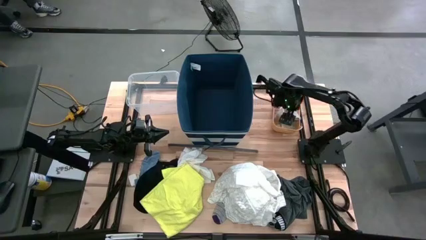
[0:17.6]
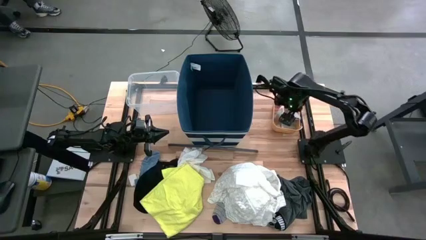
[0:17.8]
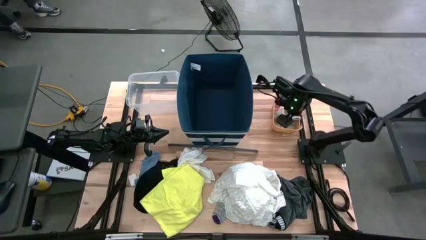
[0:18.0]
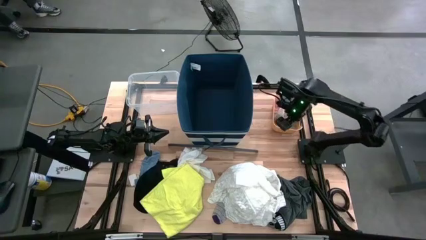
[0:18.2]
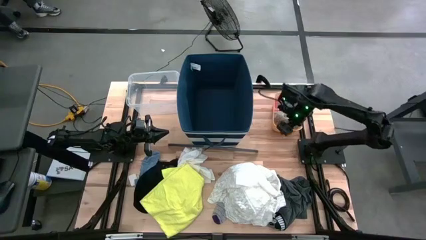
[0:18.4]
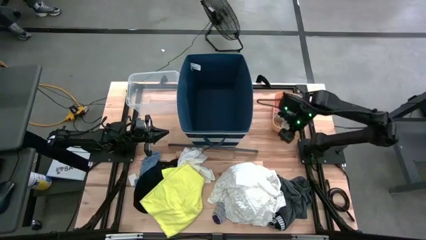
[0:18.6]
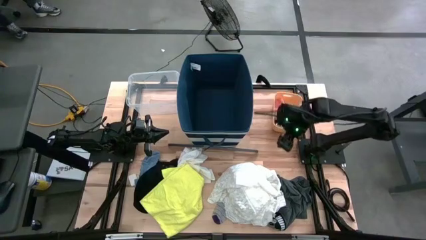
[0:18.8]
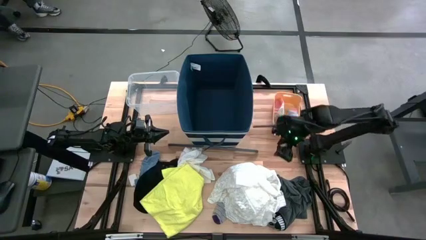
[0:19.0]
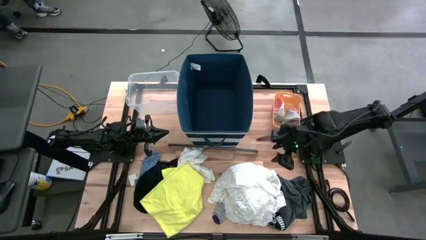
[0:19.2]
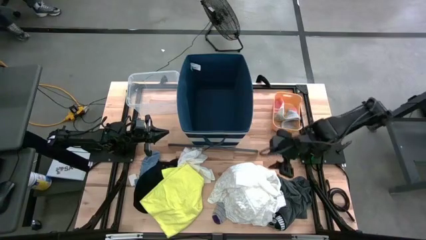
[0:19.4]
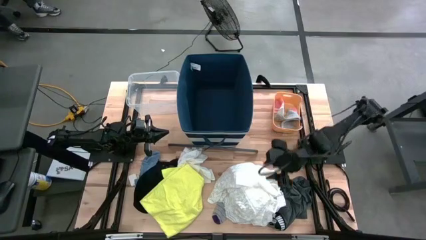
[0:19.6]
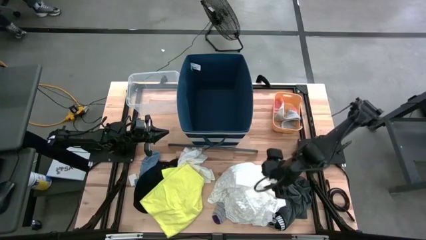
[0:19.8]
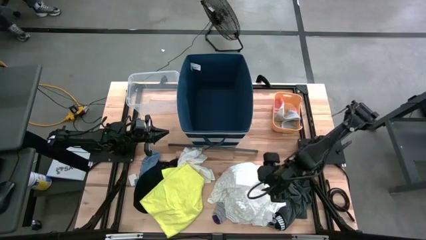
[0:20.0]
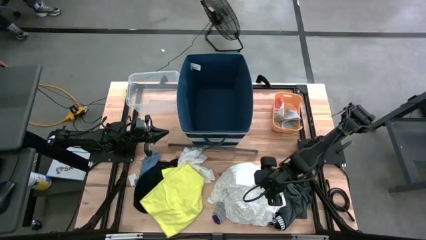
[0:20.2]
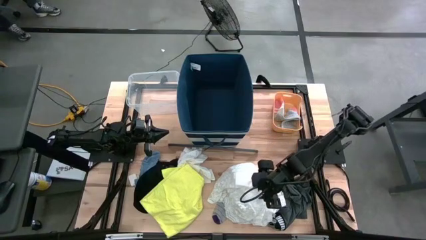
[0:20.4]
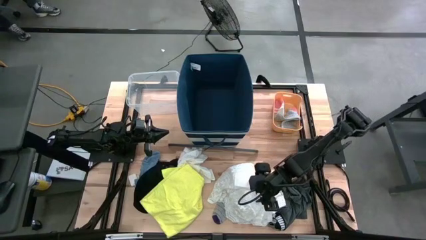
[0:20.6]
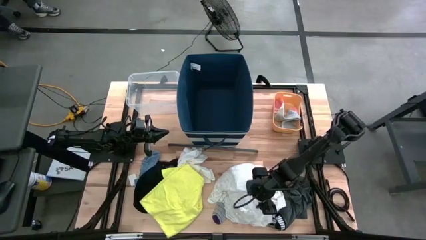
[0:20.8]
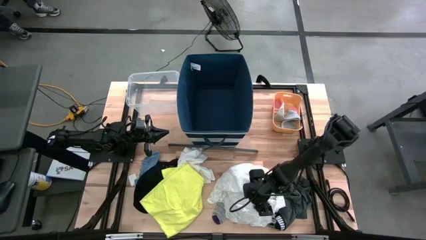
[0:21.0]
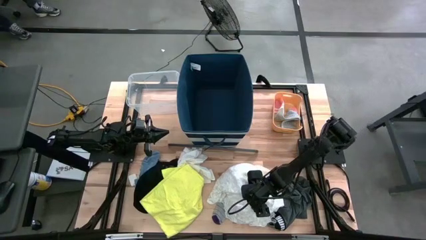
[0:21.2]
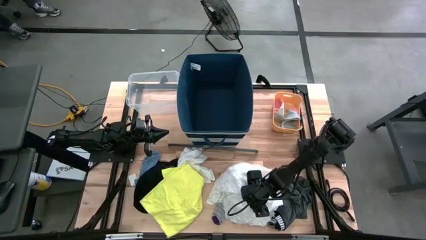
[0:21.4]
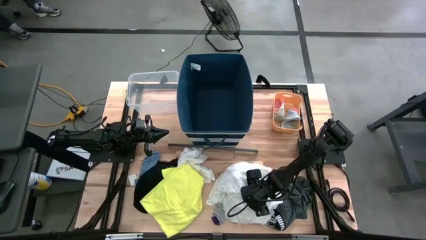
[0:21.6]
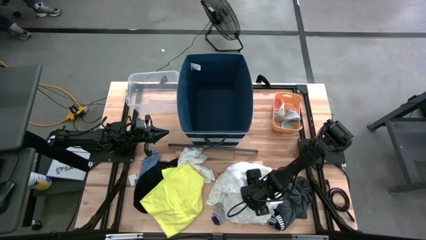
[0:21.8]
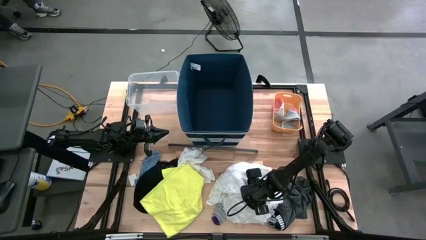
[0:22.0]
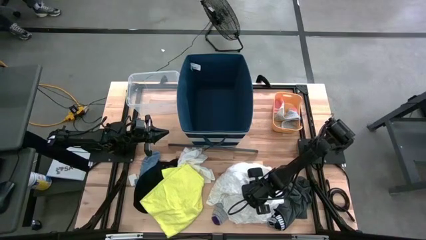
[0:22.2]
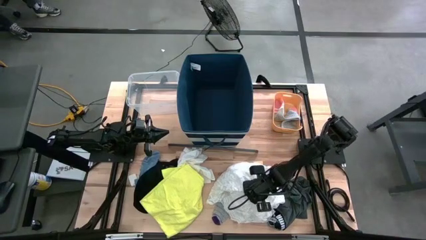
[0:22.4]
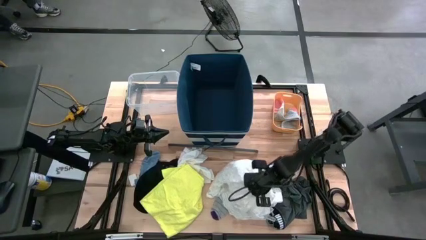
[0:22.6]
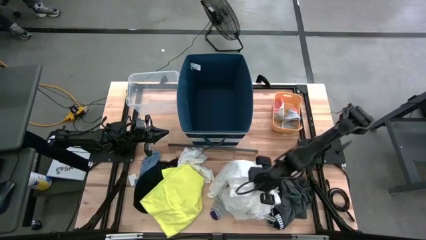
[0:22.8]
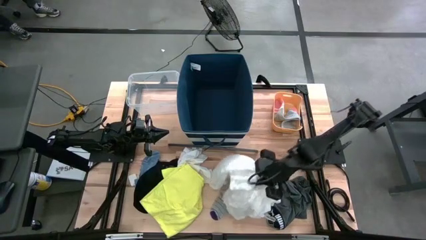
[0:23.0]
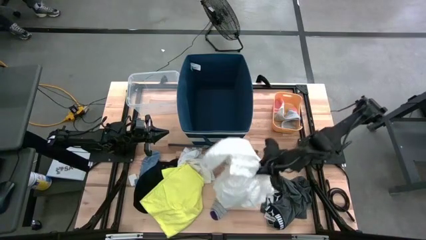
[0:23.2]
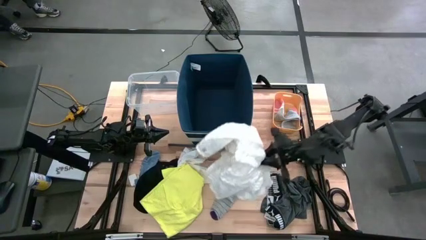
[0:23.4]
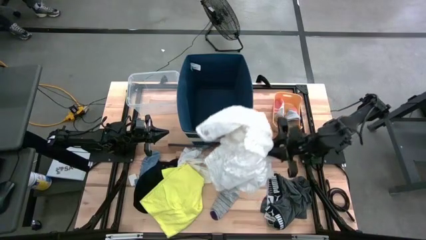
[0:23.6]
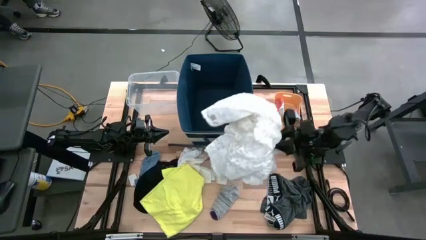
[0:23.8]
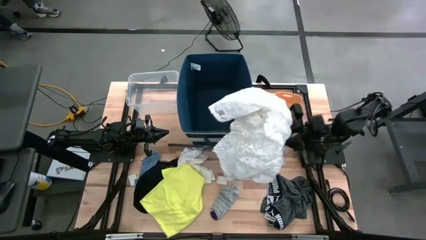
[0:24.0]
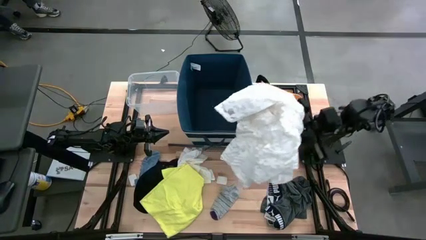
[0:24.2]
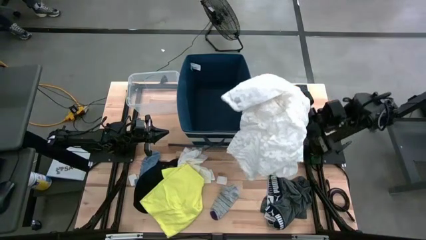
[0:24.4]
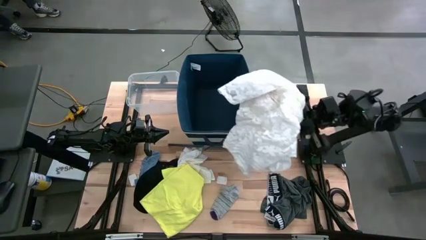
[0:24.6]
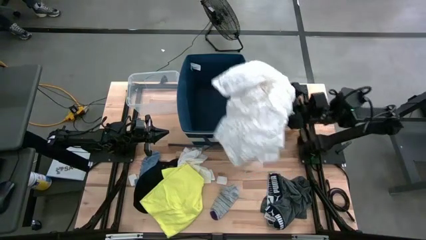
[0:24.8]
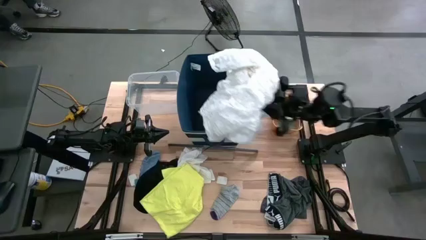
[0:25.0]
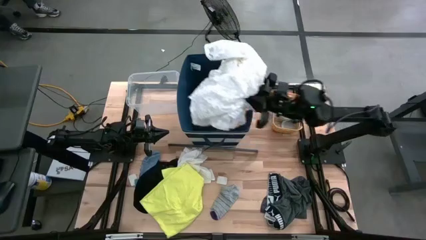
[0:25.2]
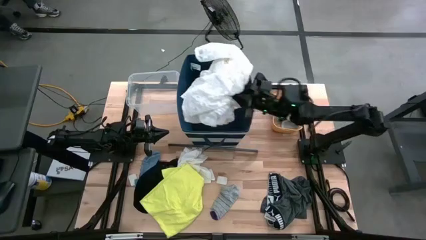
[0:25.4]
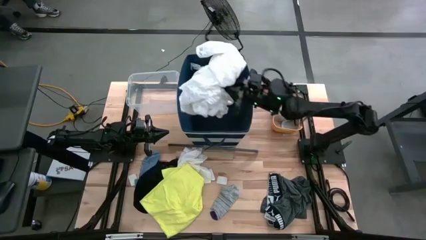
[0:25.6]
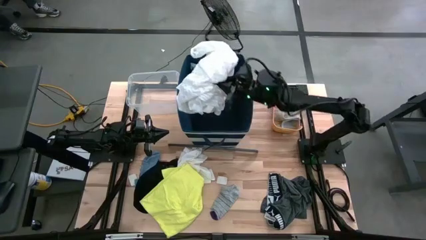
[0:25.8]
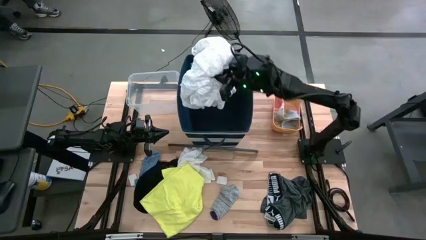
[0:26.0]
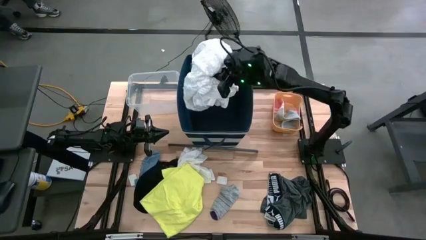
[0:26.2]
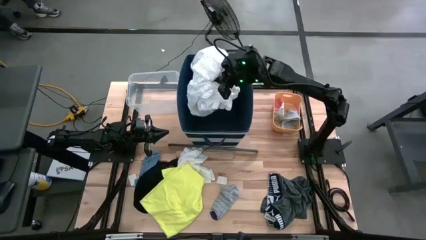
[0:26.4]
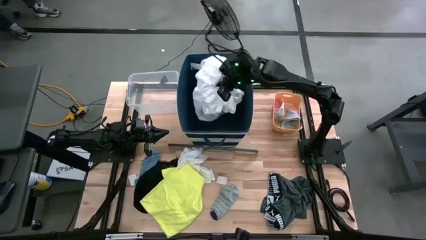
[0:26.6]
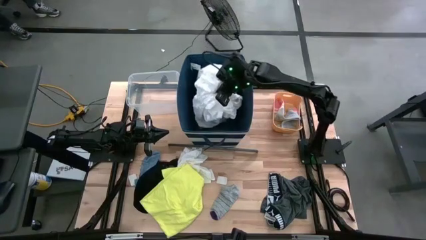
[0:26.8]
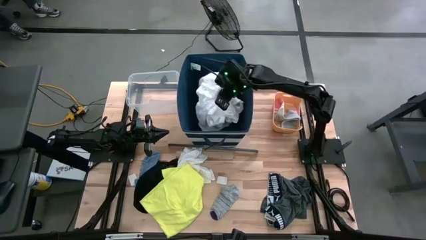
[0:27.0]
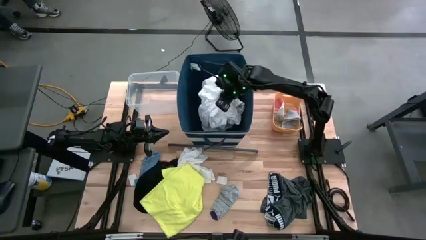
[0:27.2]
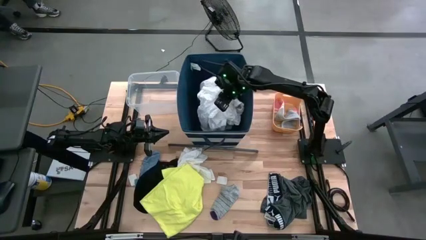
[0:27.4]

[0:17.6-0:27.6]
Task: Pick & Place Cloths
Put the white dress into the blue laundry organizer
